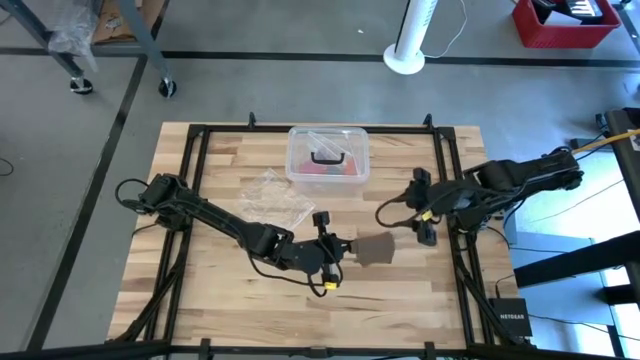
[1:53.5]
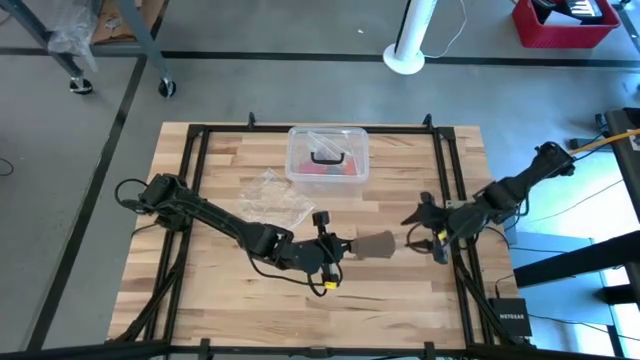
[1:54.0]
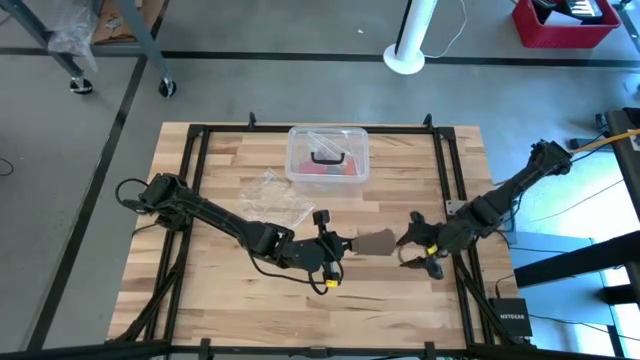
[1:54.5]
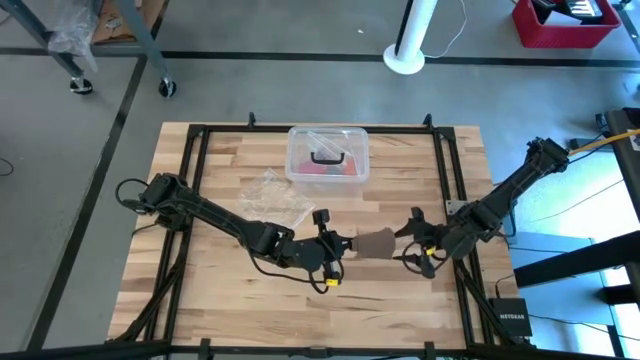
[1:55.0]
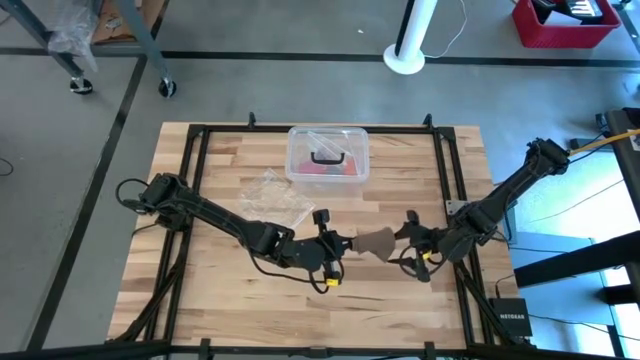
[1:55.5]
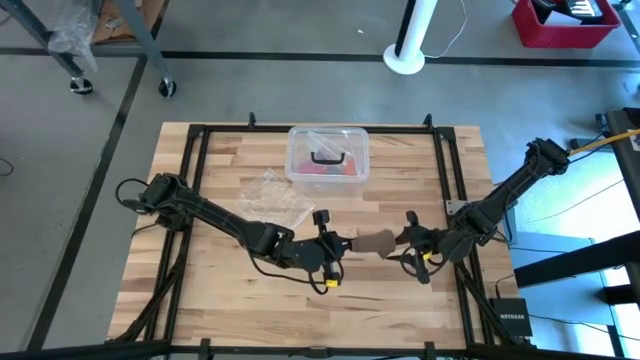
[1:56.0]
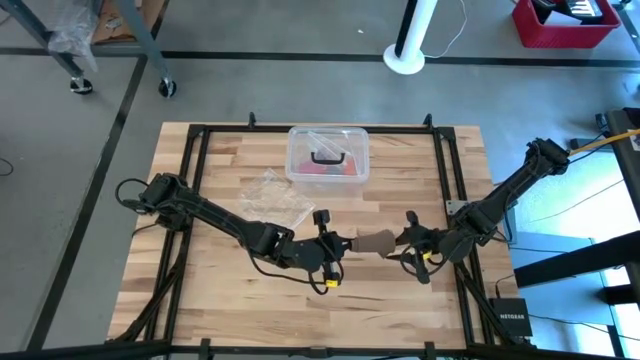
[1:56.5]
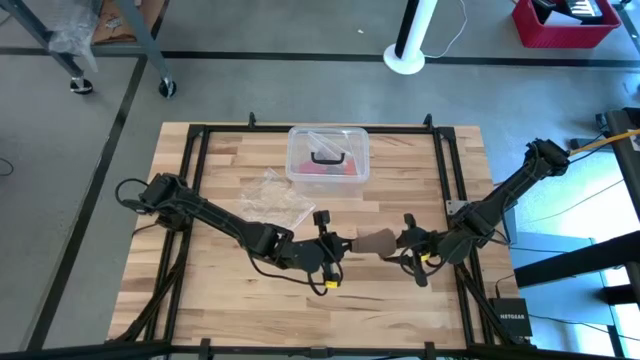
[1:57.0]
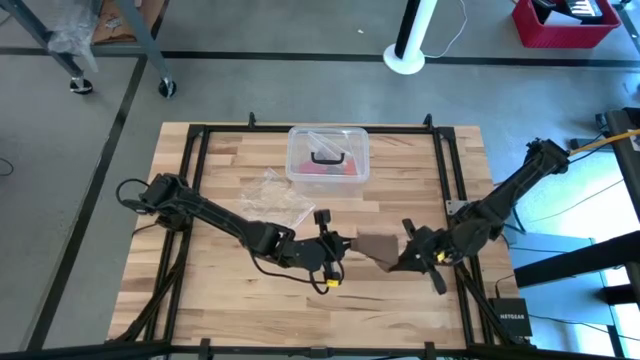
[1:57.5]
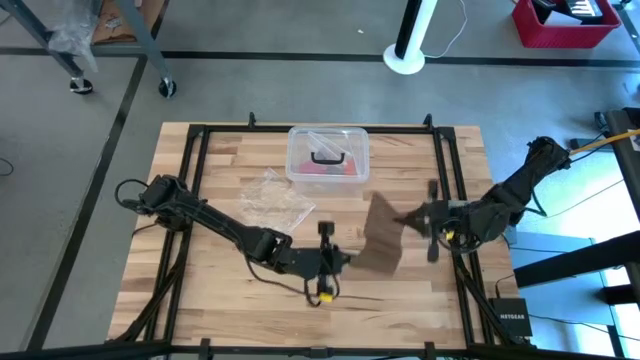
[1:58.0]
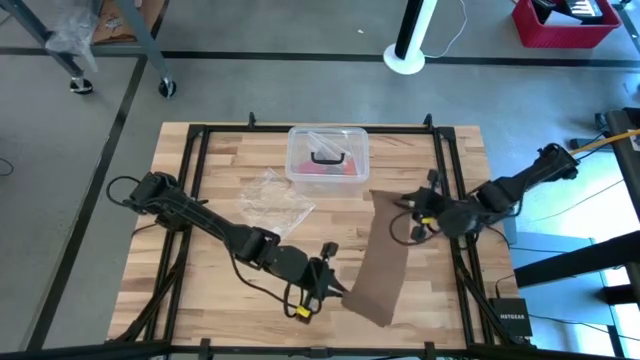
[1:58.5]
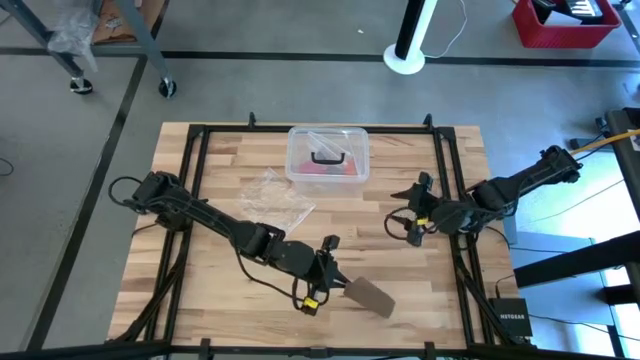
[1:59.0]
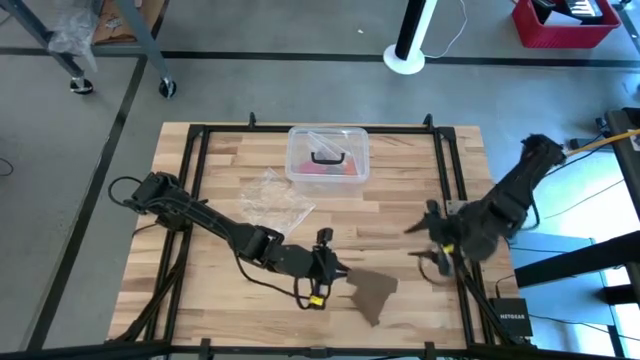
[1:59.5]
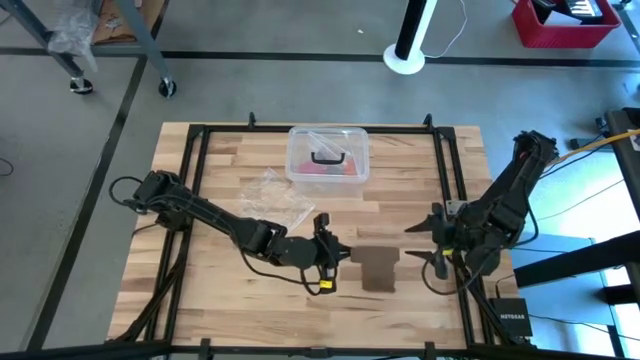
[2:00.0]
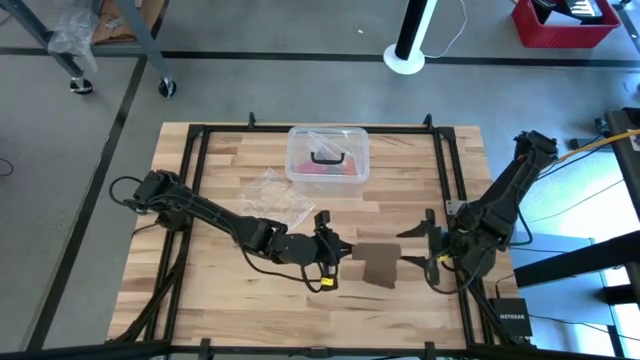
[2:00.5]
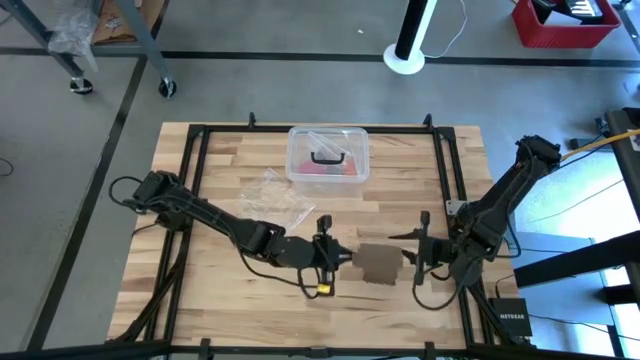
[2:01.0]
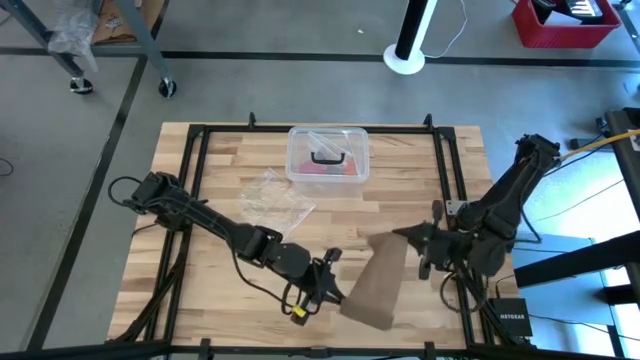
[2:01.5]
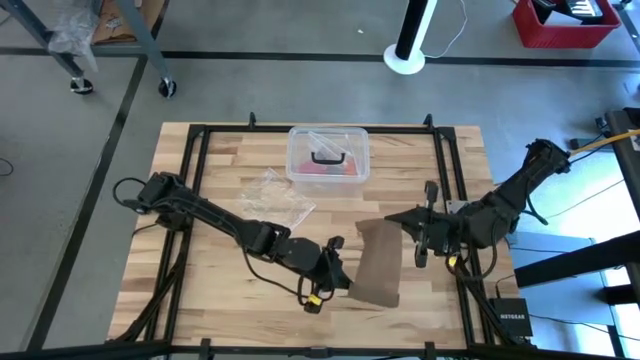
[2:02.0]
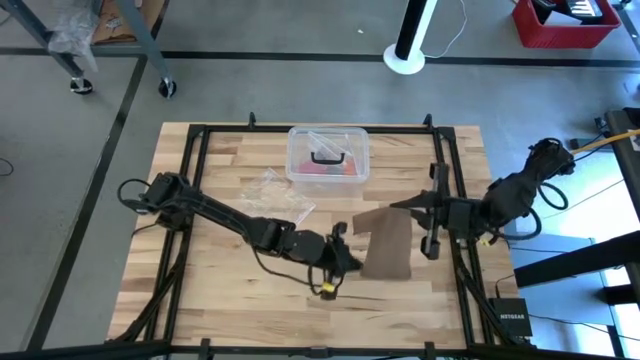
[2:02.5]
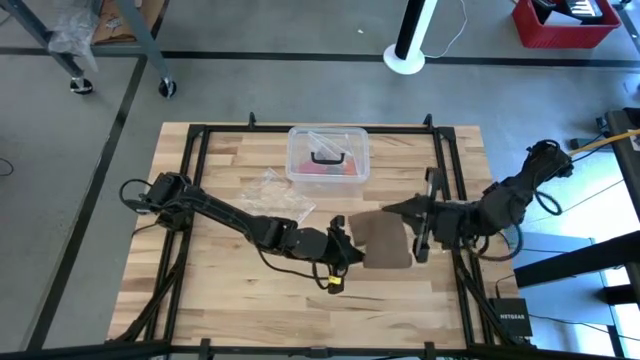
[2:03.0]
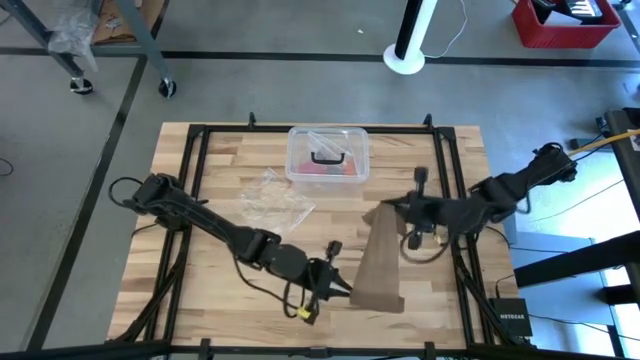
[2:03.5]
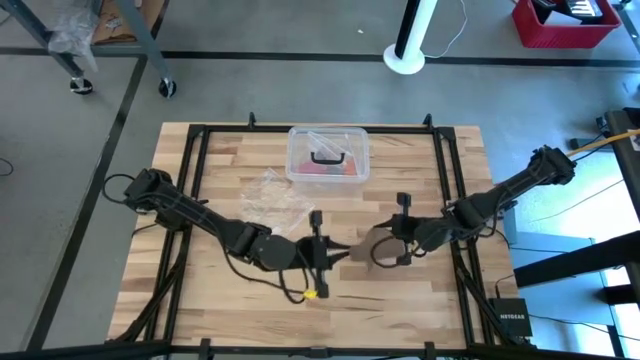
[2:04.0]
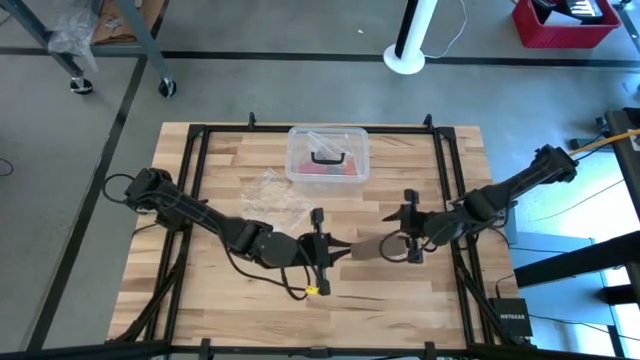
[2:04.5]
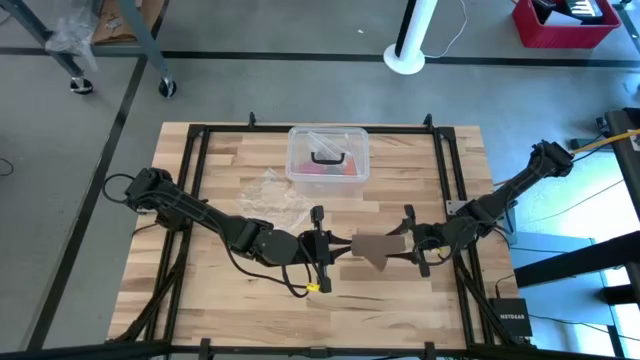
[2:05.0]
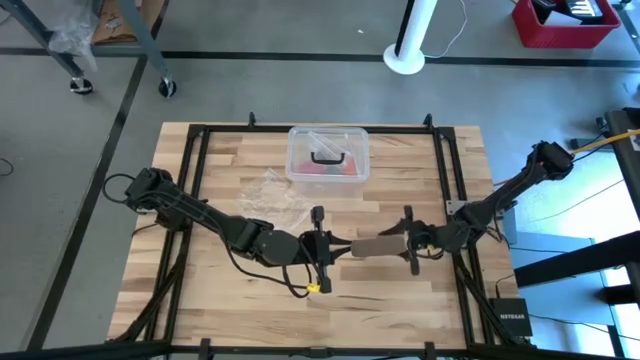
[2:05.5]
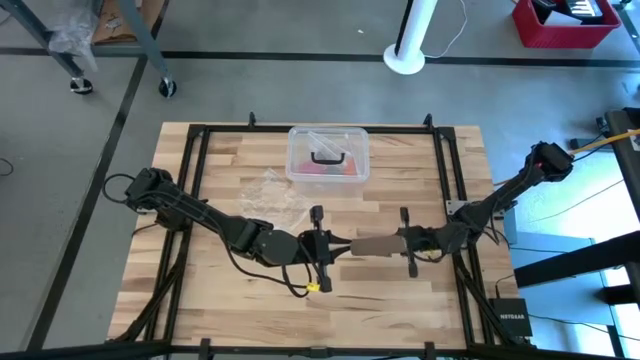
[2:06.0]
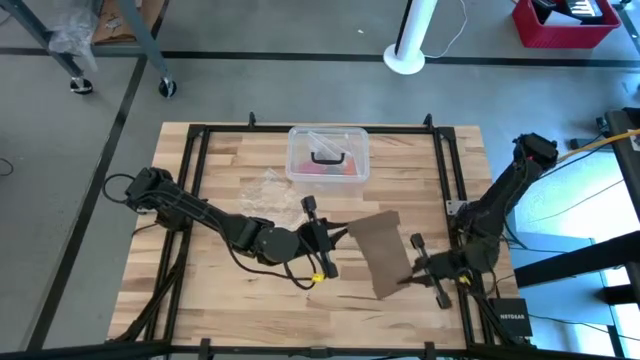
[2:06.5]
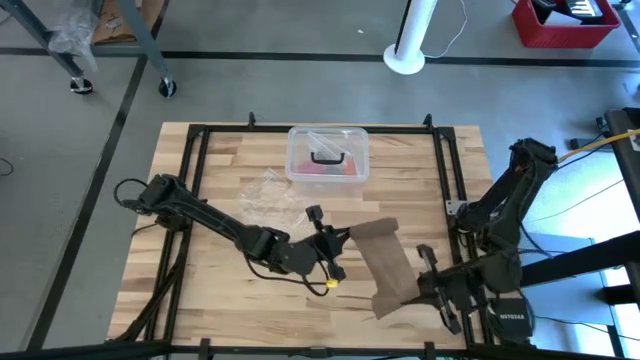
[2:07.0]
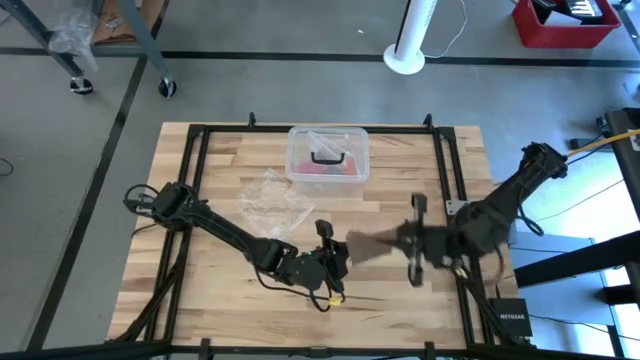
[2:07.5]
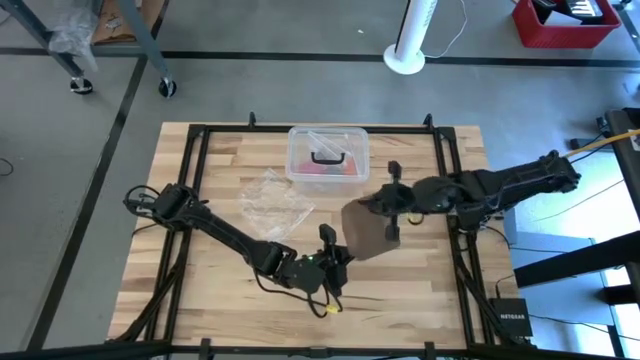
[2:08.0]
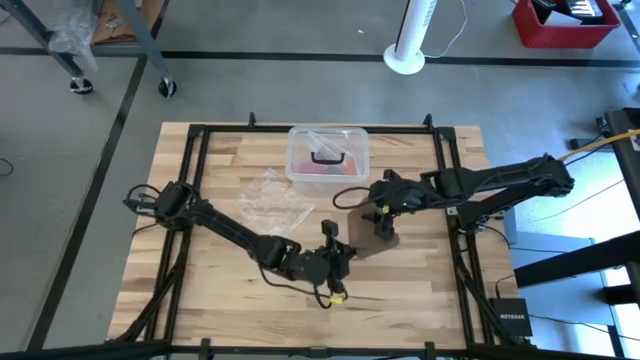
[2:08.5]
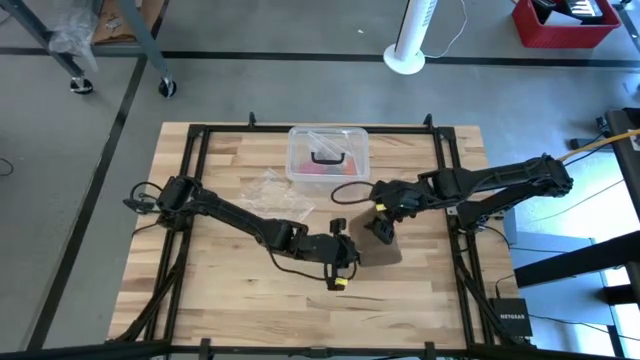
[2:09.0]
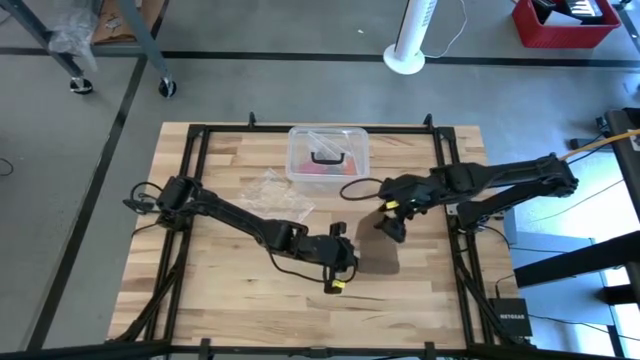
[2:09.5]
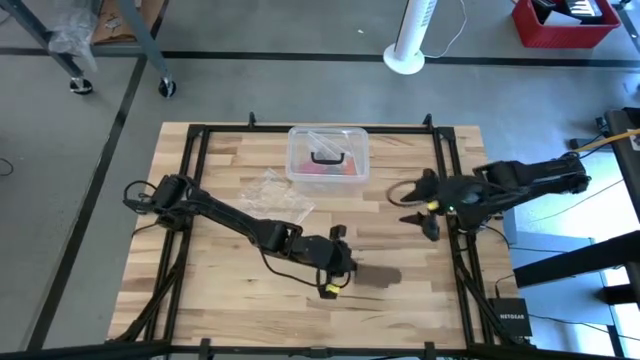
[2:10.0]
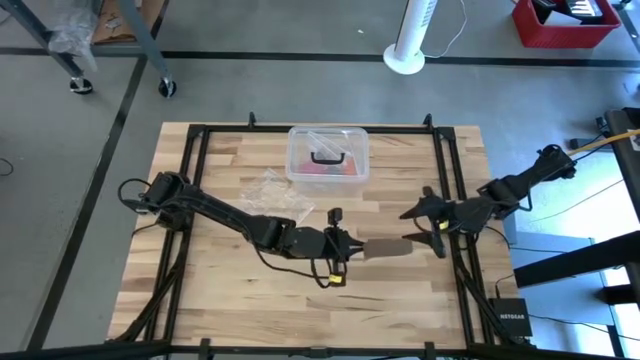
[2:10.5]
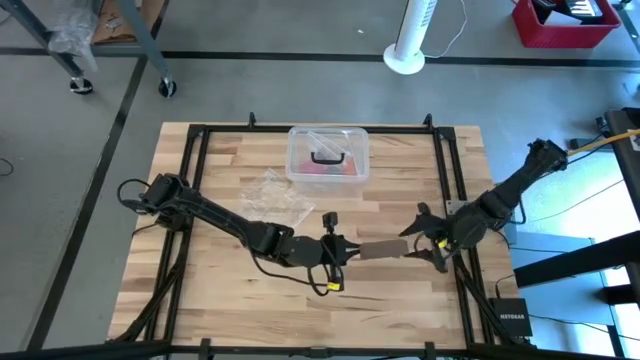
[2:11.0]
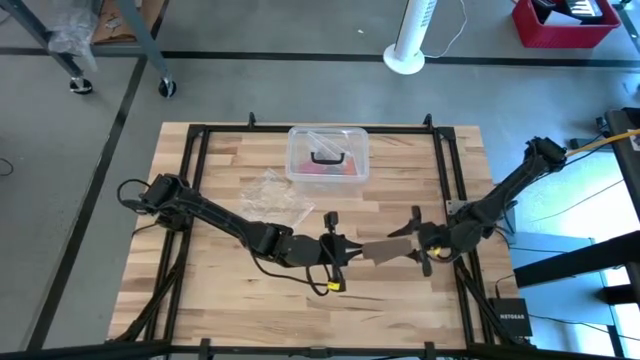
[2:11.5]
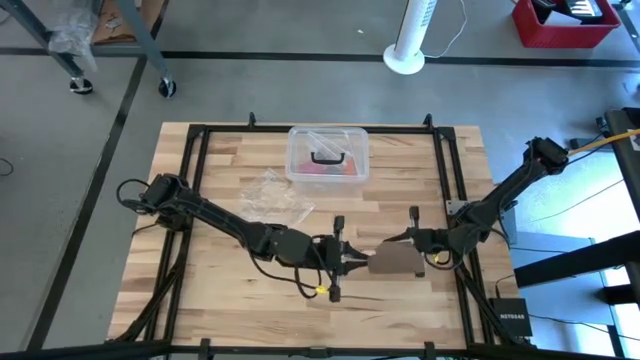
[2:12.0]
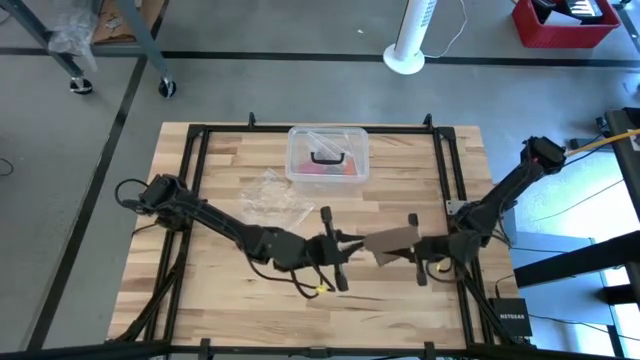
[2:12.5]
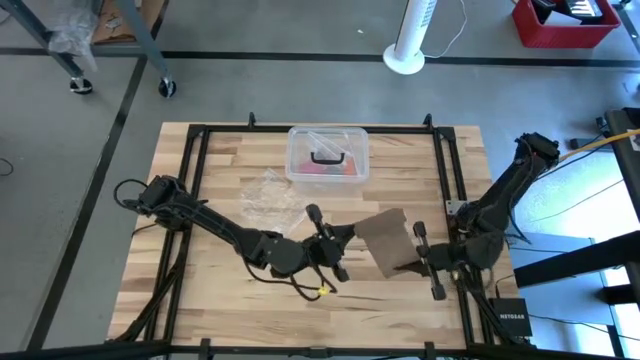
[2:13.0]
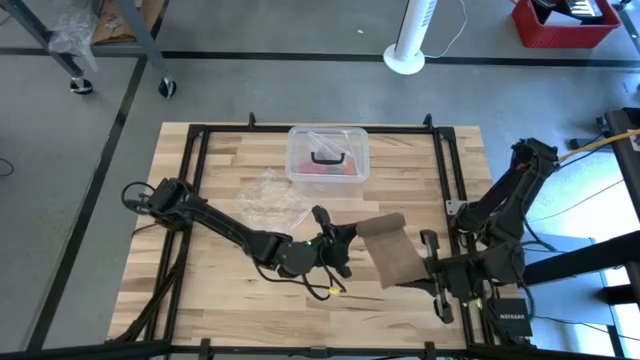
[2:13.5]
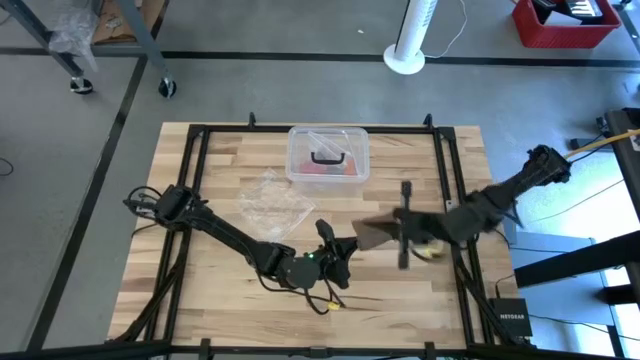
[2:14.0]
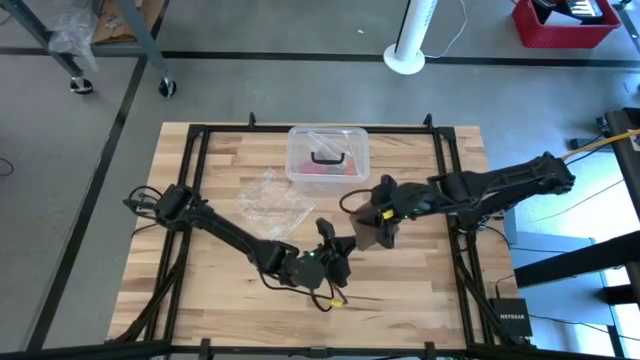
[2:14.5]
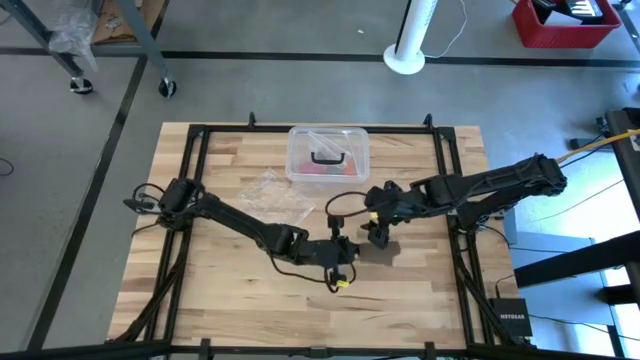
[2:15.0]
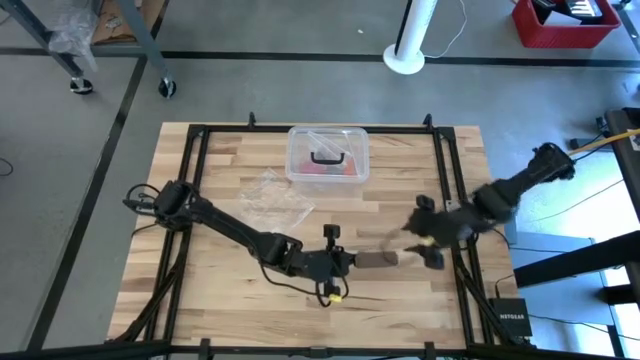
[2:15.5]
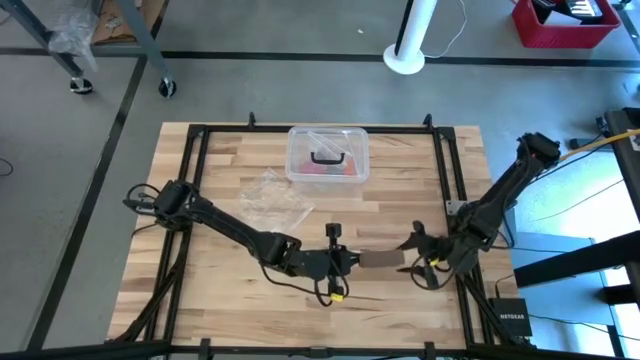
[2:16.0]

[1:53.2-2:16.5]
Task: Roll bandage
Roll the brown bandage
